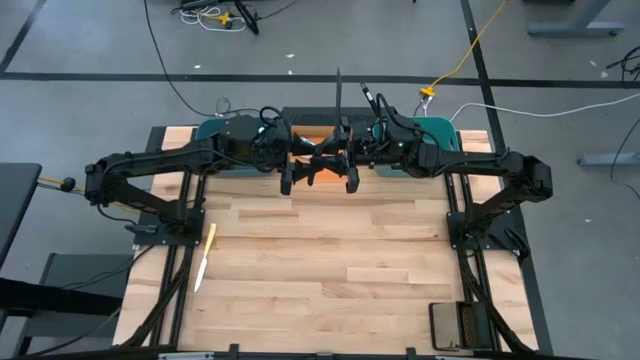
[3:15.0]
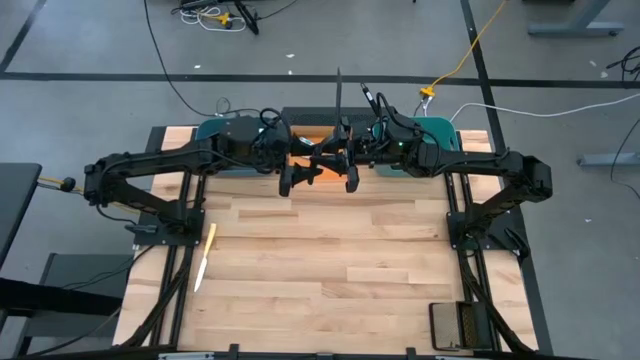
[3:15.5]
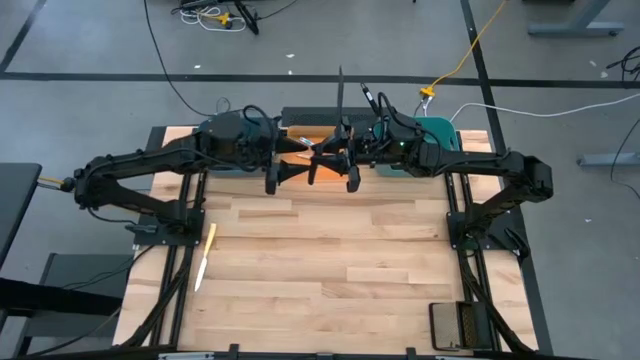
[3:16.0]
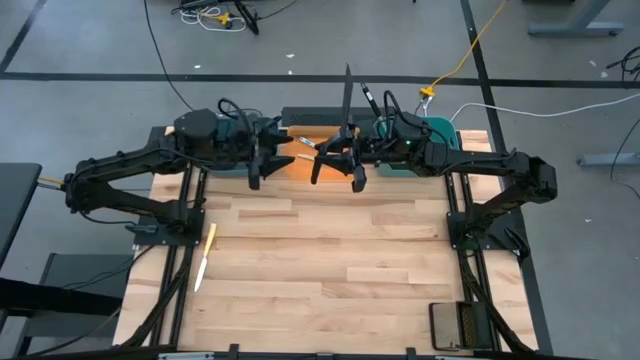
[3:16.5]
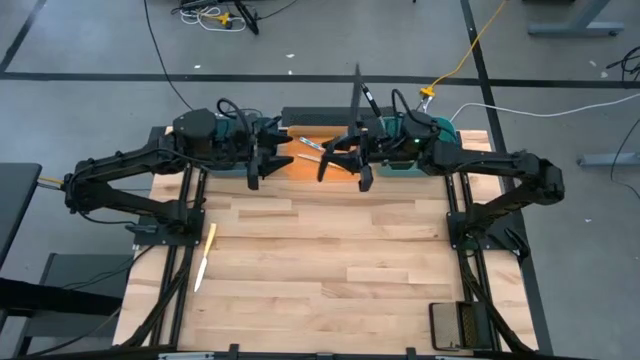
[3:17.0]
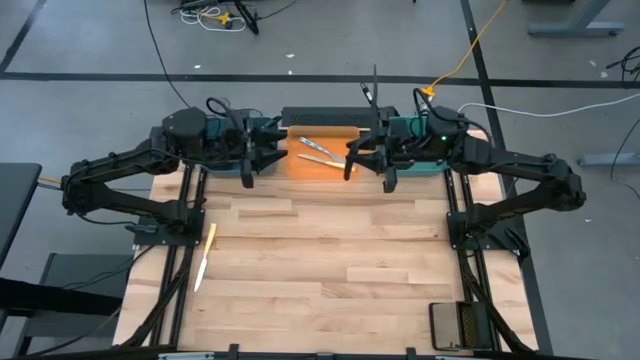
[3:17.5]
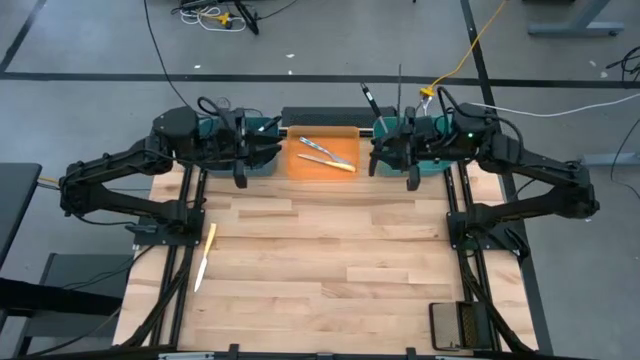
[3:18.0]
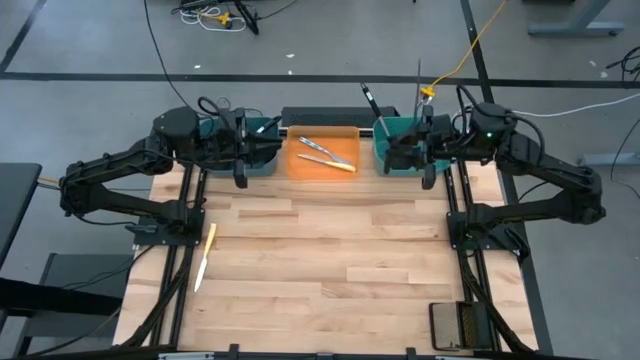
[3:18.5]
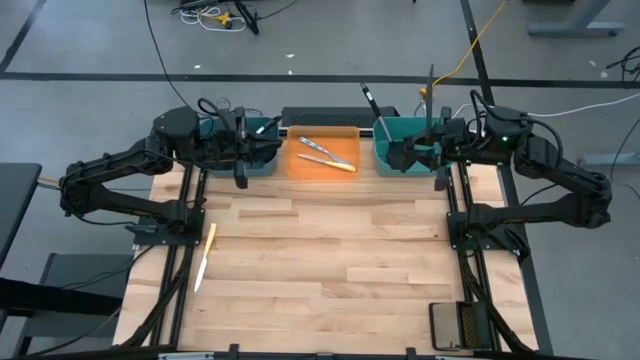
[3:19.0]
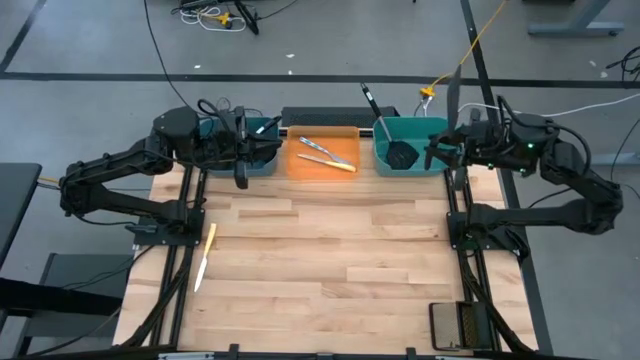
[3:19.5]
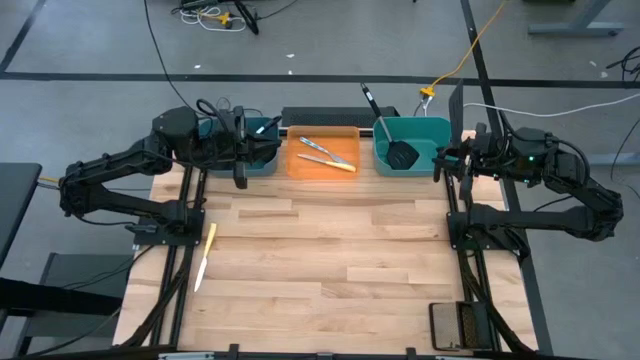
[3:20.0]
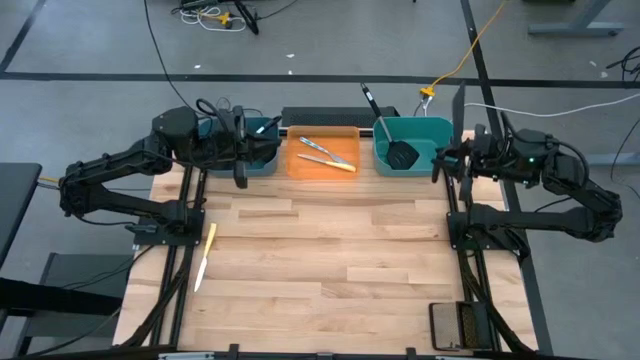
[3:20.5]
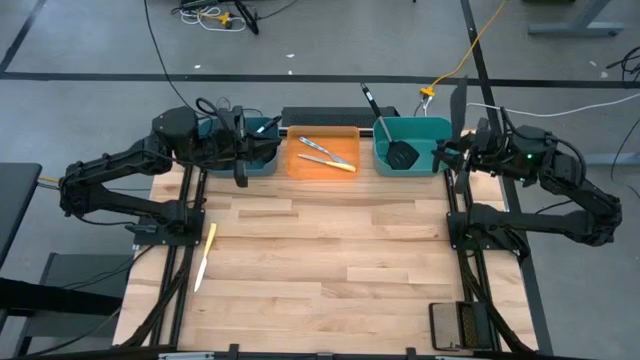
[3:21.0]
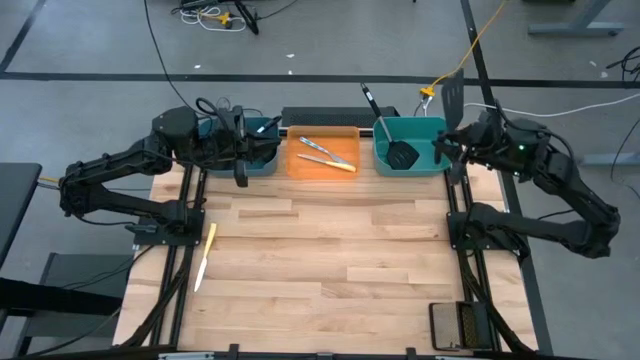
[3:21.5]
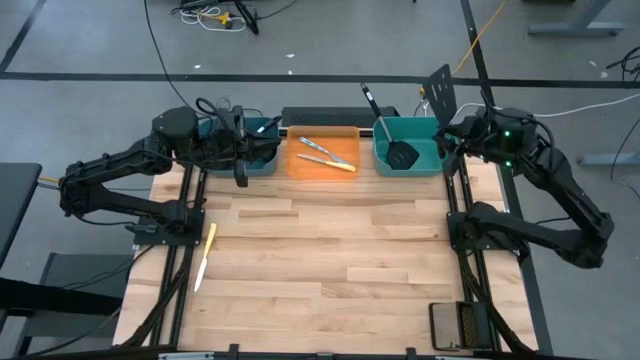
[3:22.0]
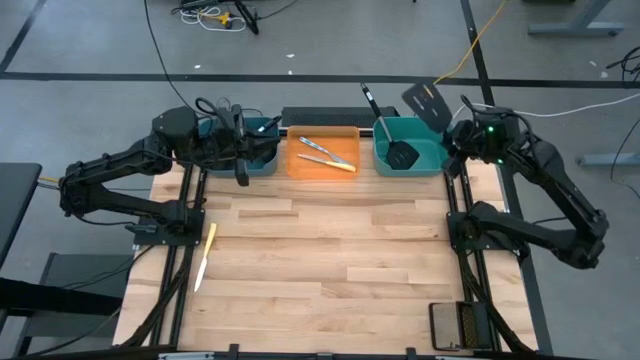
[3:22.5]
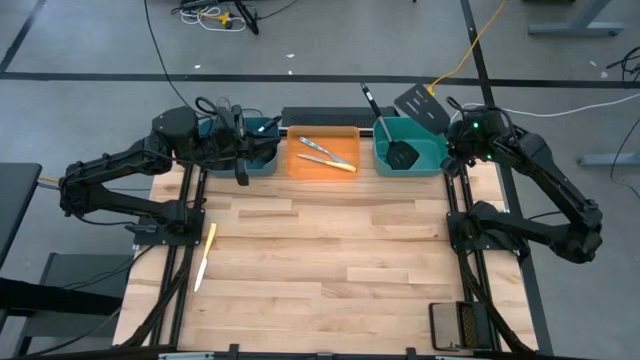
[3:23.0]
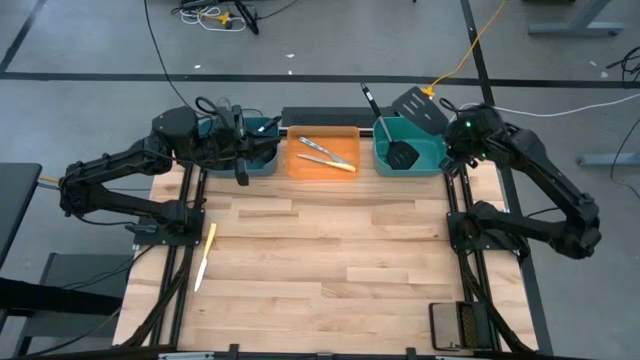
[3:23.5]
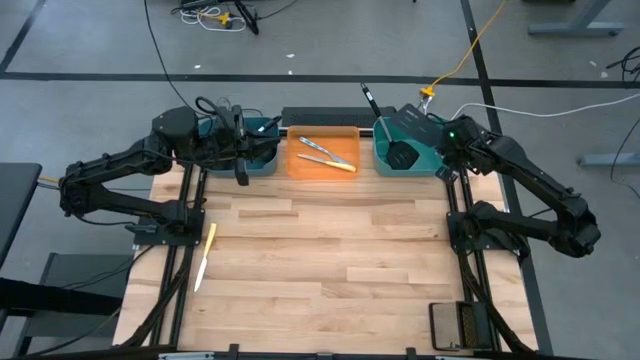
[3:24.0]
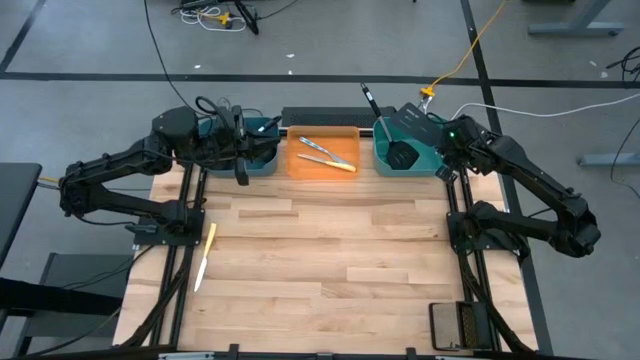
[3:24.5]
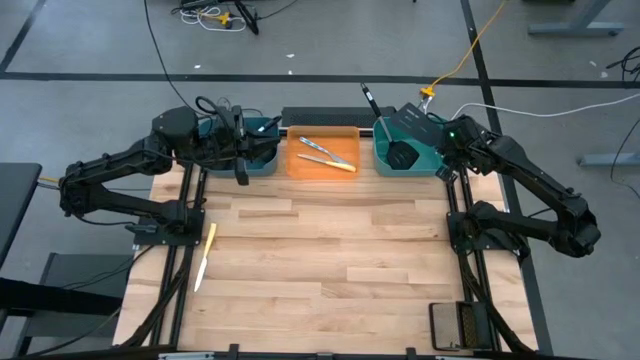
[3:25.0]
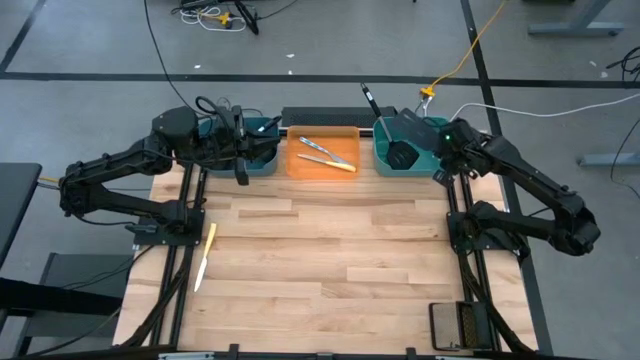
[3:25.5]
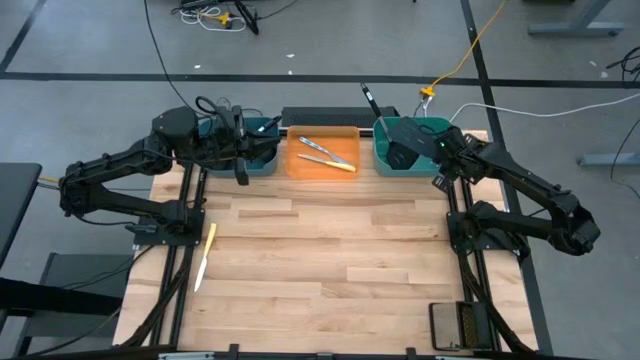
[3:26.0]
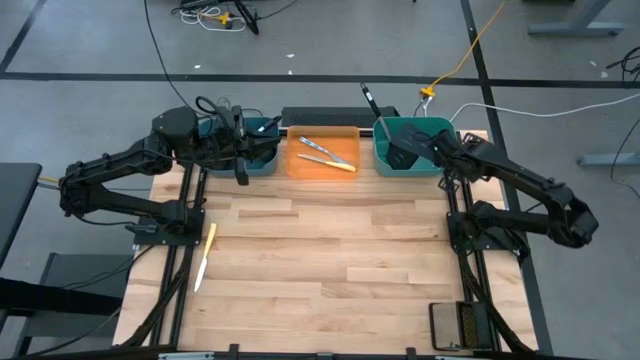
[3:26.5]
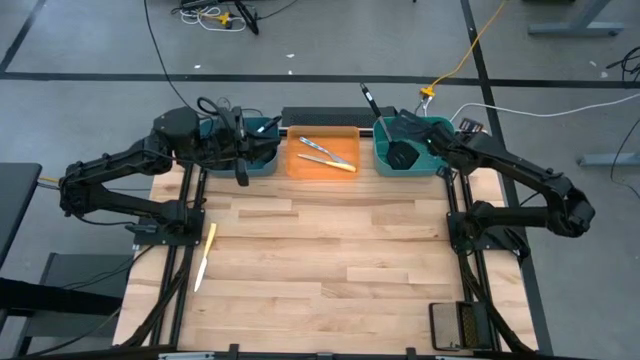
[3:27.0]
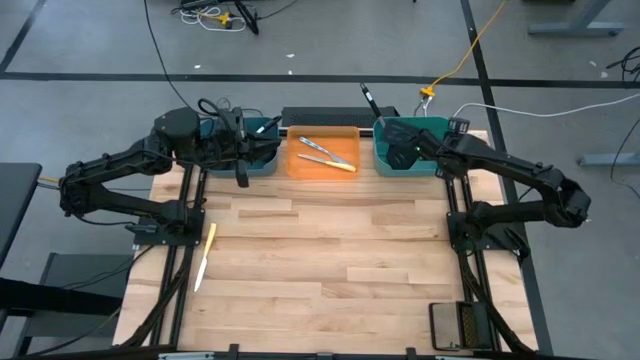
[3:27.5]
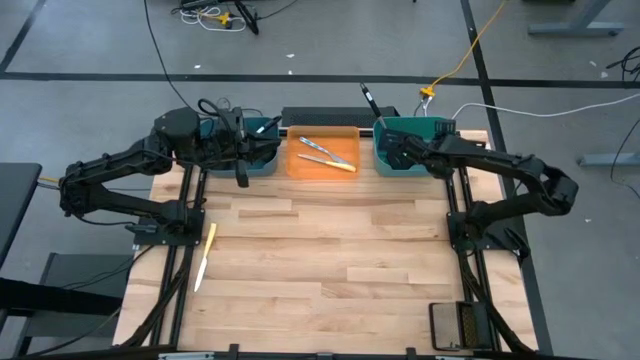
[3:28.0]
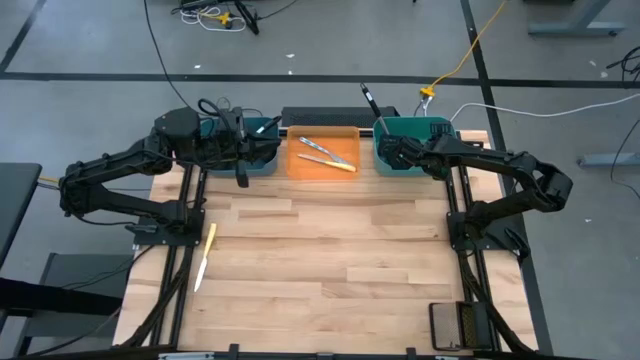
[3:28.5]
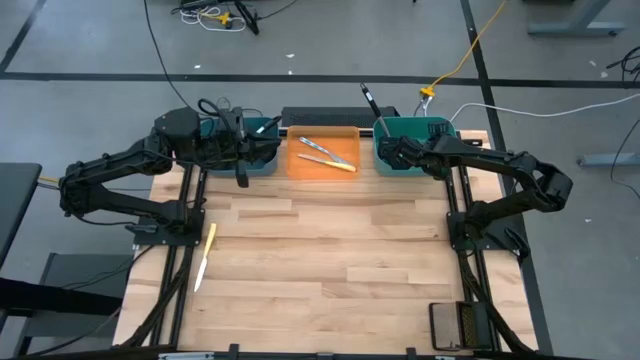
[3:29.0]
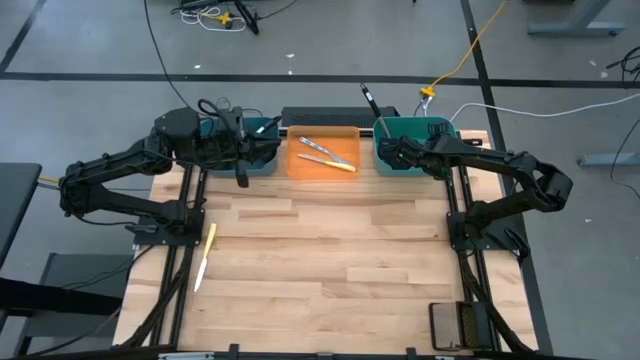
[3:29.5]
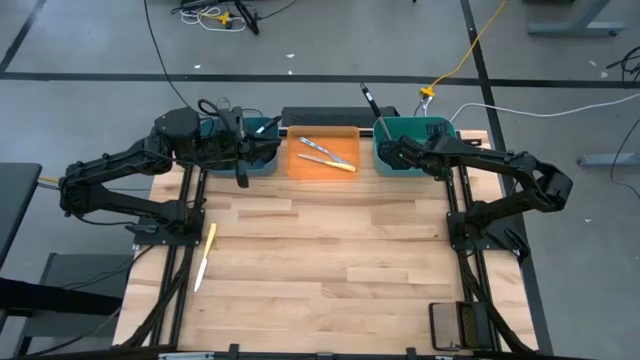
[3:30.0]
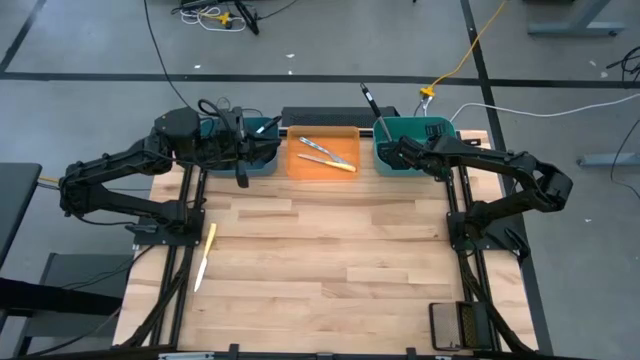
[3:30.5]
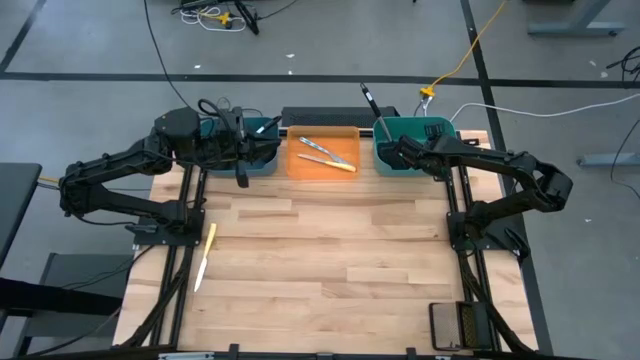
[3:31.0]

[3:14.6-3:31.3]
Task: Pick & Place Kitchen Items
Put the black spatula into the green bin

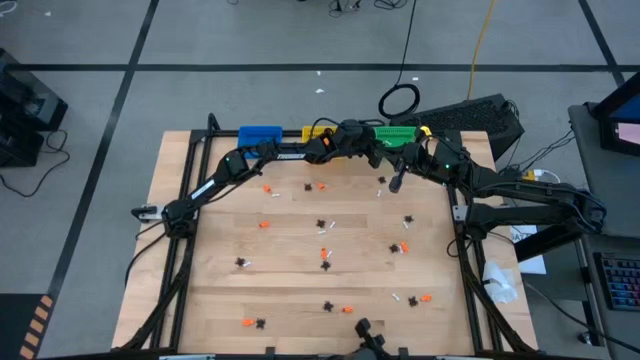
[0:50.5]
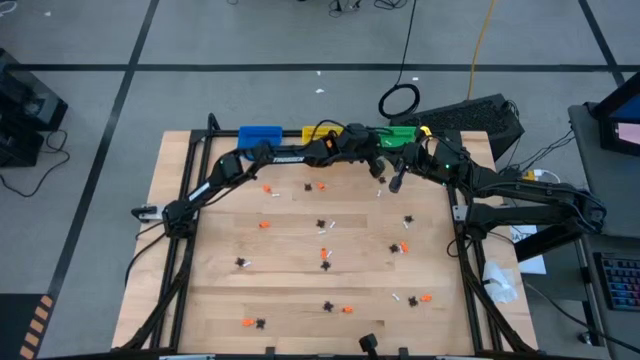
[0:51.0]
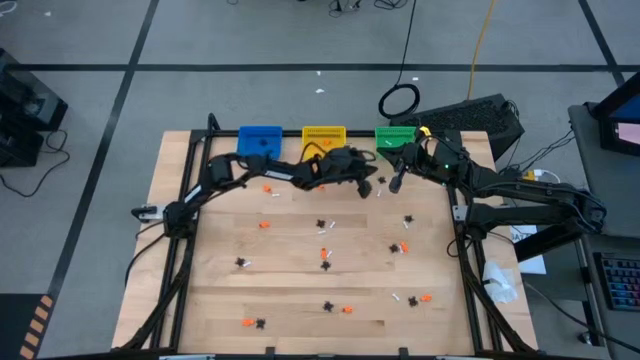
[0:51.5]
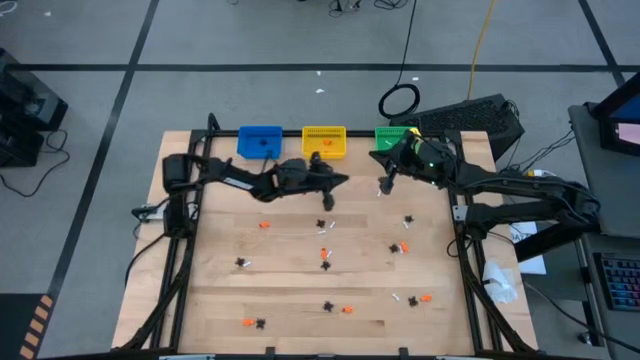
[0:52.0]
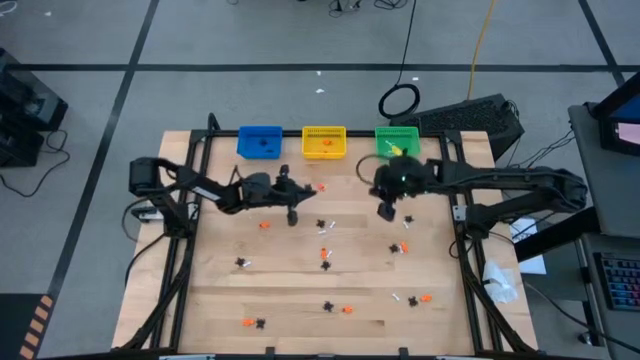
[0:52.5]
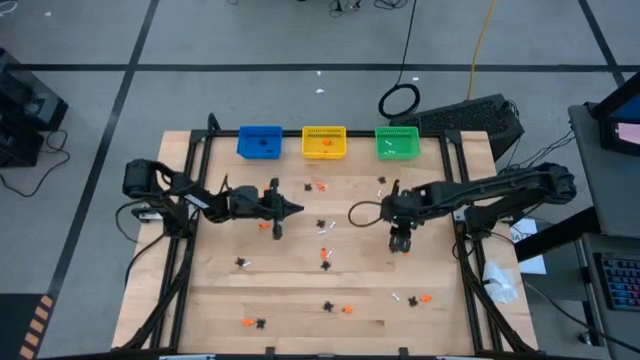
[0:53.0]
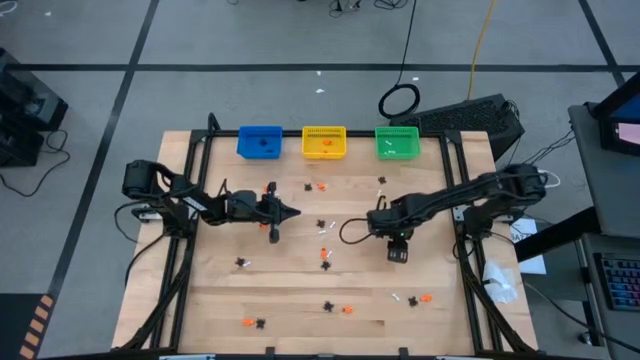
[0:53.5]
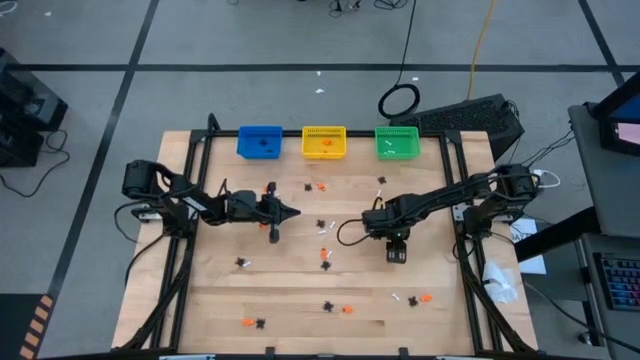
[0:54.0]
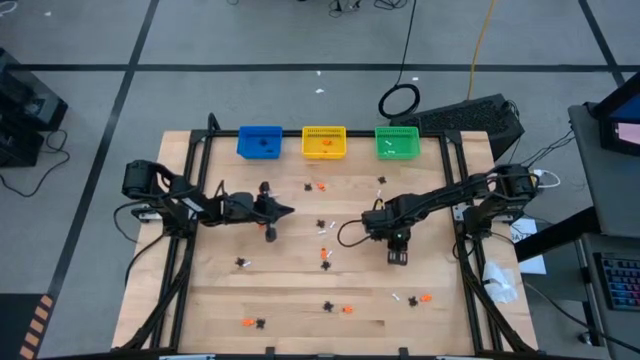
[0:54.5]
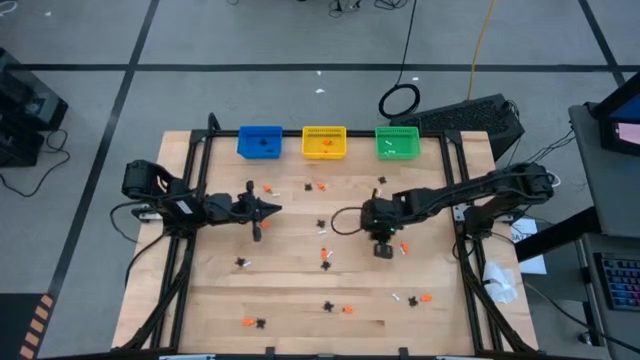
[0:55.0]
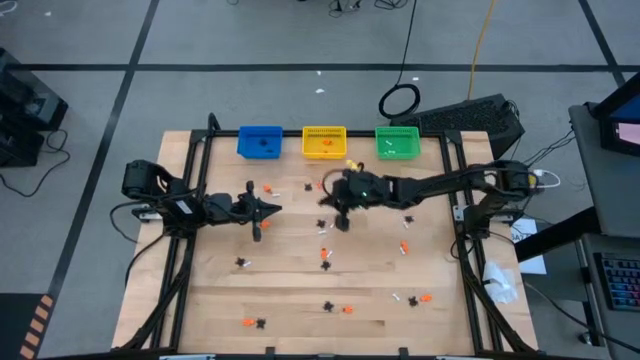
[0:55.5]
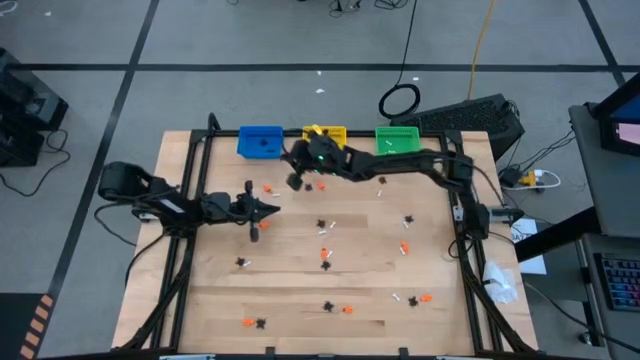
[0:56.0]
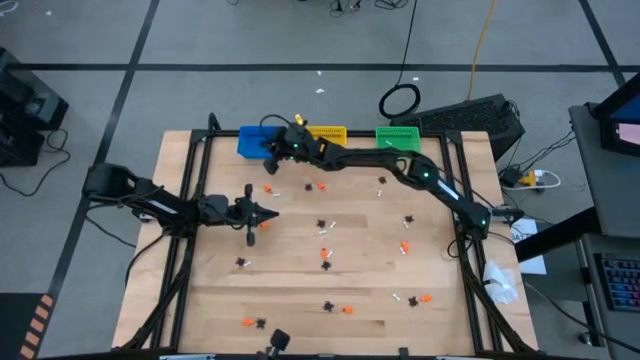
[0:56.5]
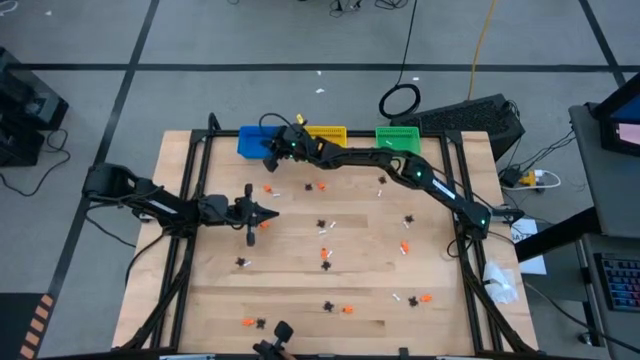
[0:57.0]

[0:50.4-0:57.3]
Task: Sort Halloween decoration
Put the black spider toy into the blue bin
